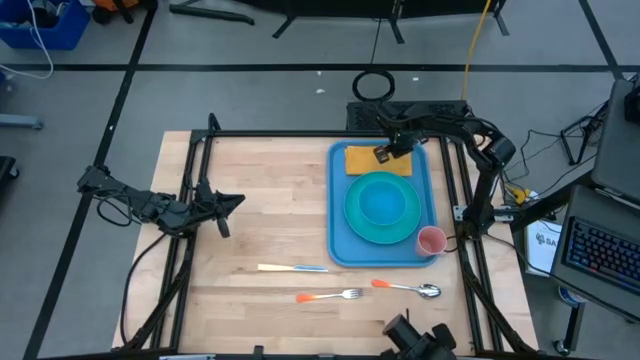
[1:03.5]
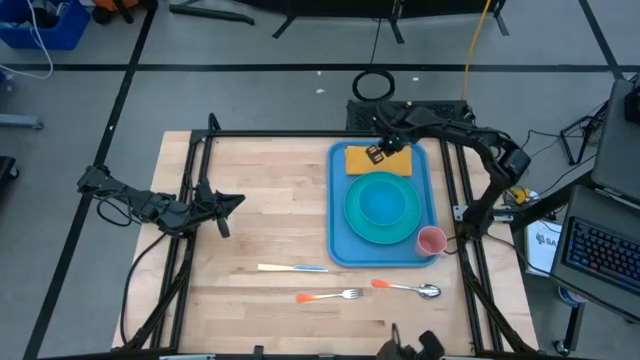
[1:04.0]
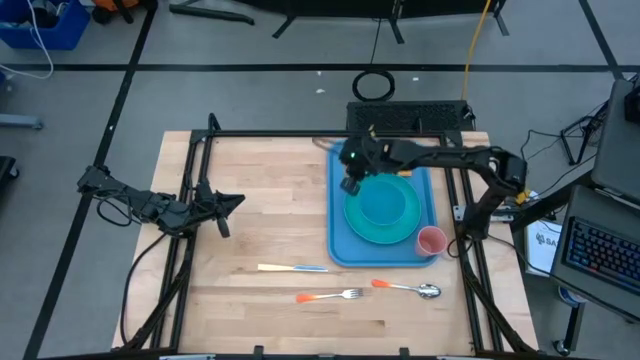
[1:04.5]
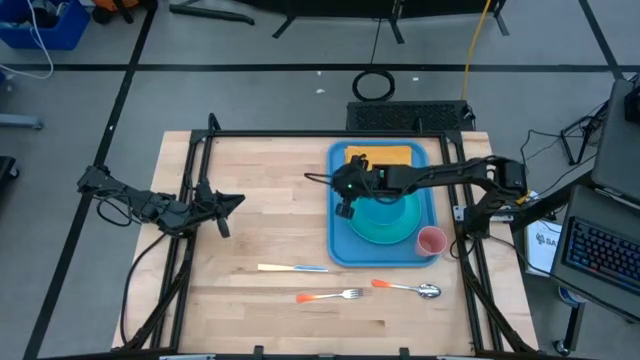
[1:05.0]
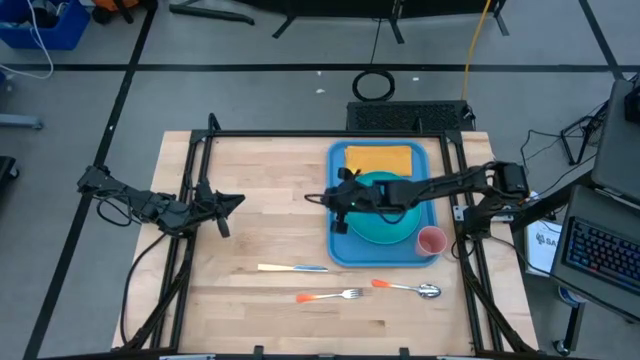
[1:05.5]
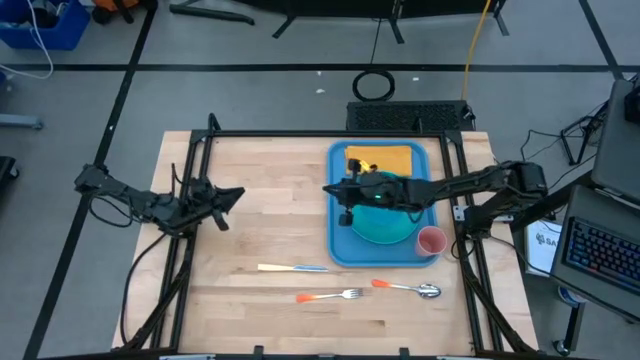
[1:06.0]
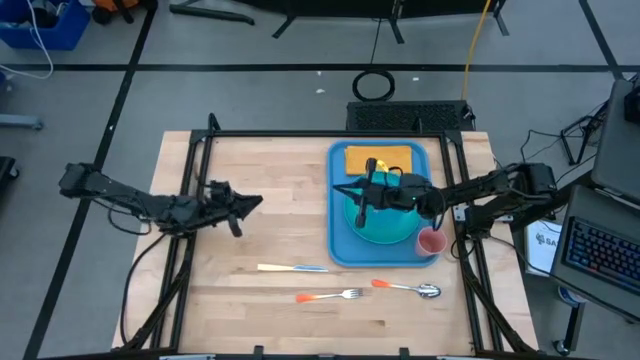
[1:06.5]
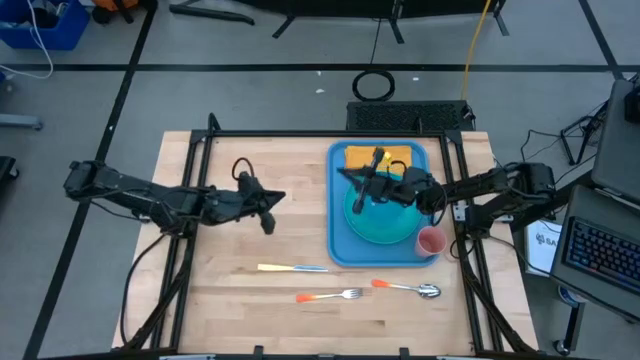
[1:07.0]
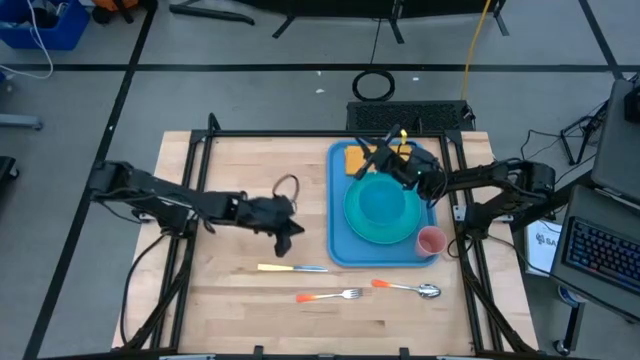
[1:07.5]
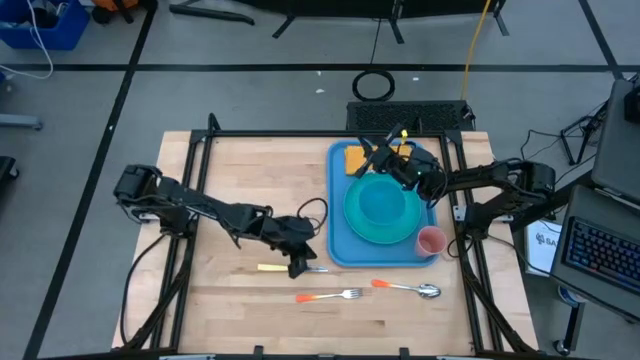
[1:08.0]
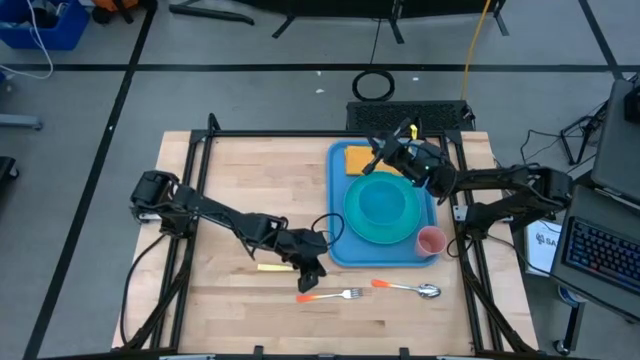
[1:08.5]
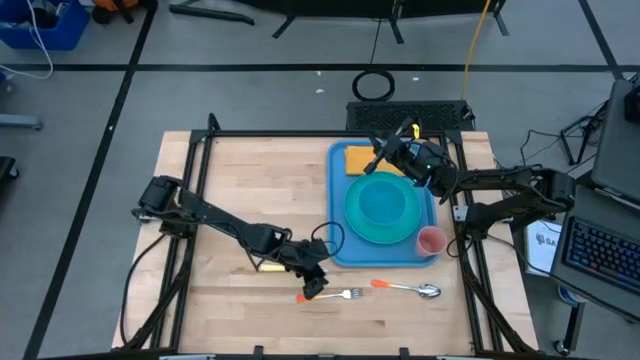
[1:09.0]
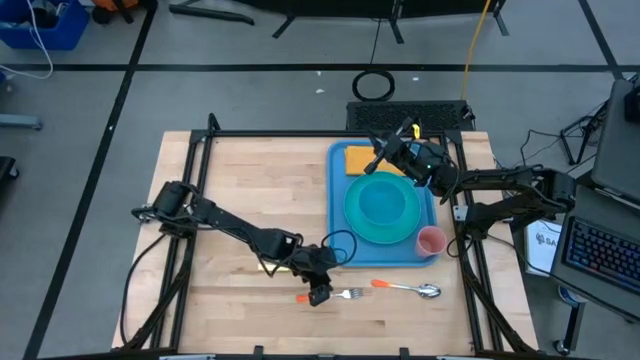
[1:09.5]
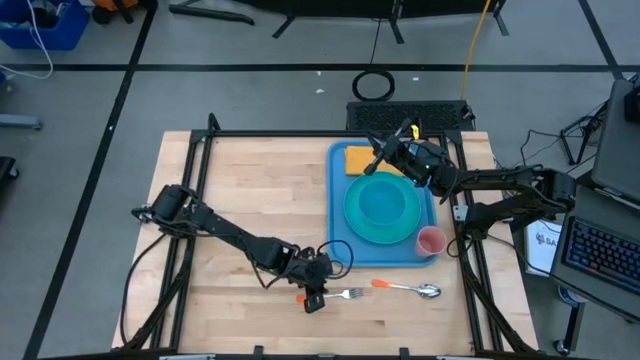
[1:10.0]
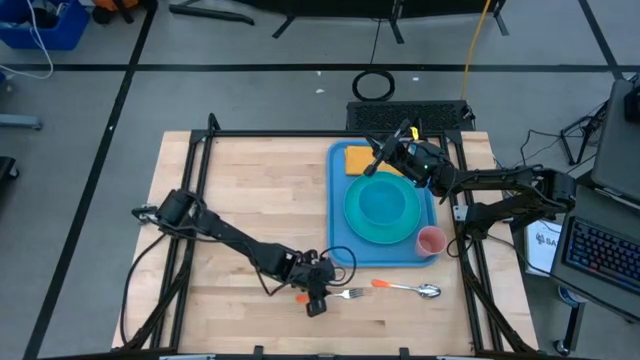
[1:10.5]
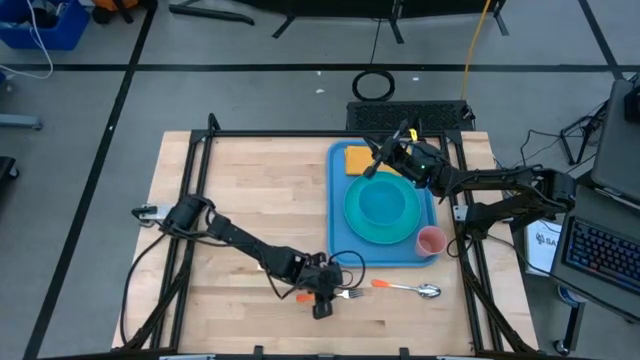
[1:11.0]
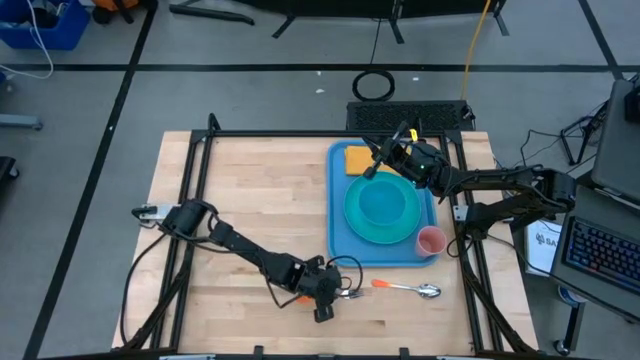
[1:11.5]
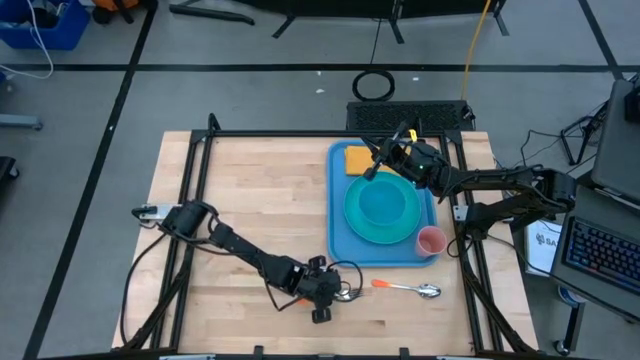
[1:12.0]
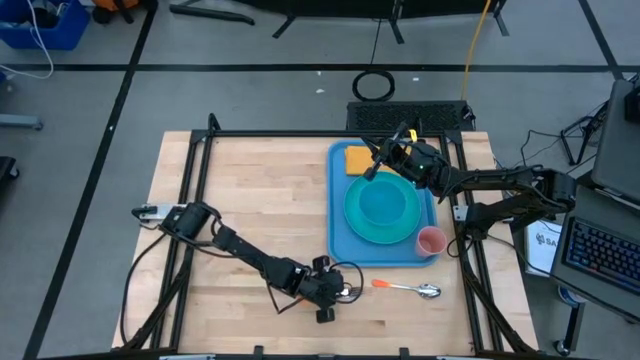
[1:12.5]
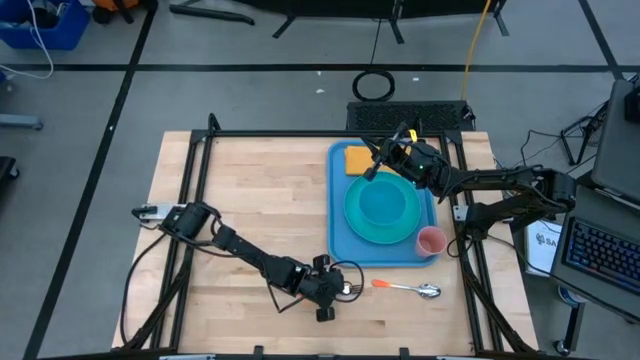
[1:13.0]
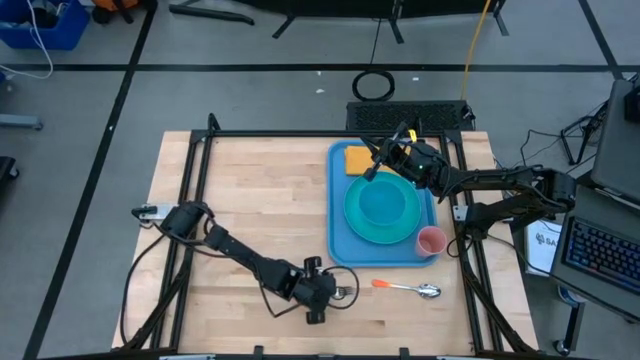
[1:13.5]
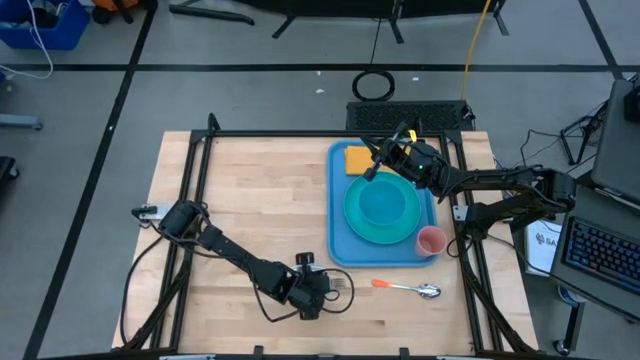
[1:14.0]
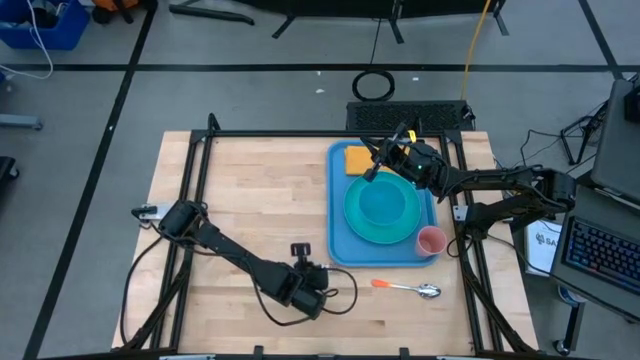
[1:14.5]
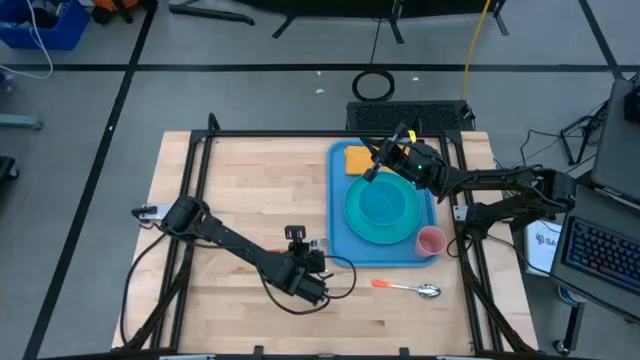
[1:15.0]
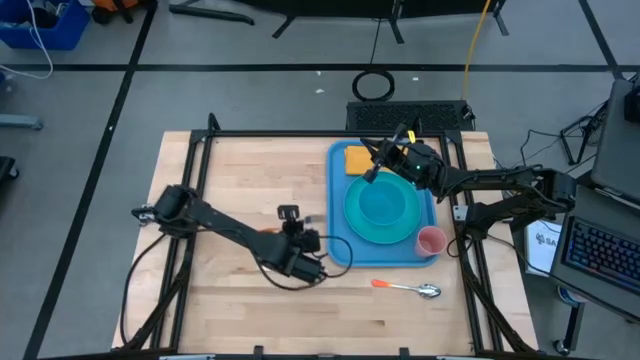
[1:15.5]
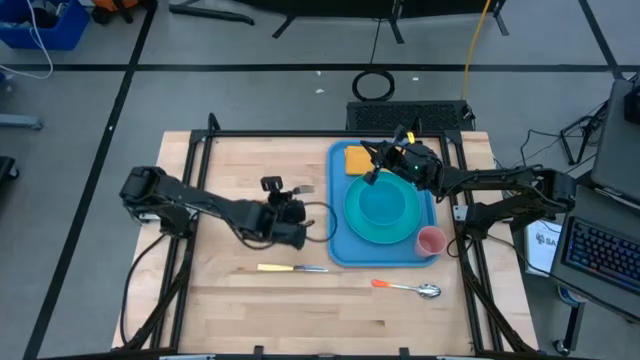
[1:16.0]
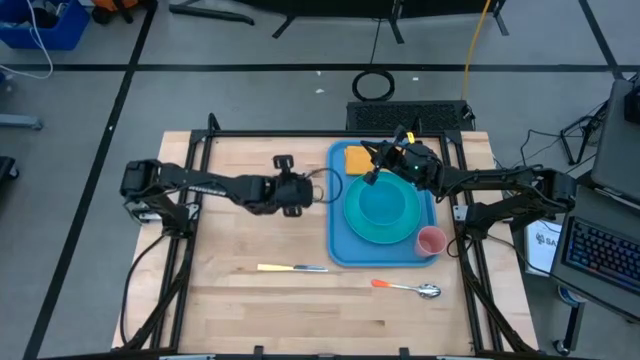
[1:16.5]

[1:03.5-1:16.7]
Task: Set up tray
Put the orange fork on the yellow table napkin on the blue serving tray

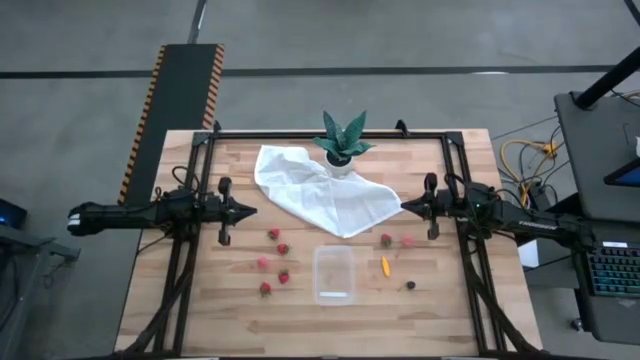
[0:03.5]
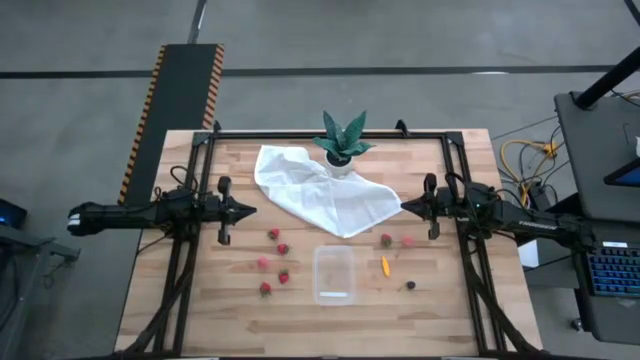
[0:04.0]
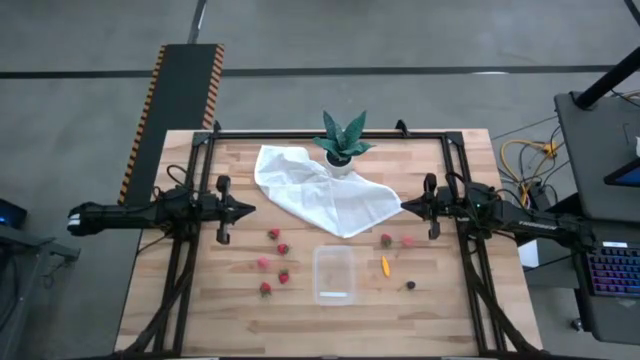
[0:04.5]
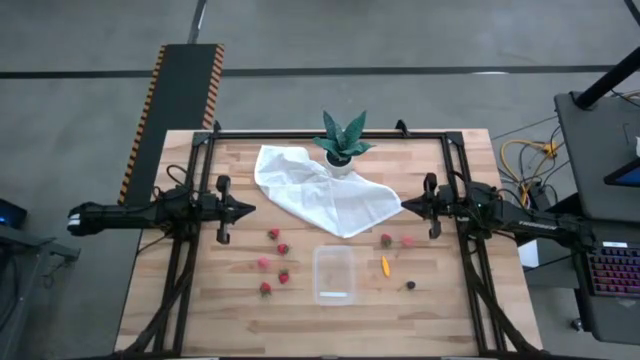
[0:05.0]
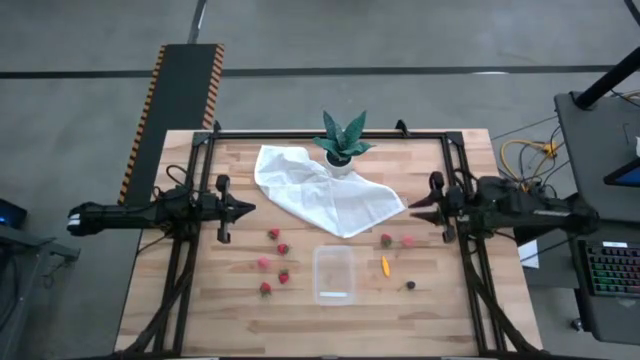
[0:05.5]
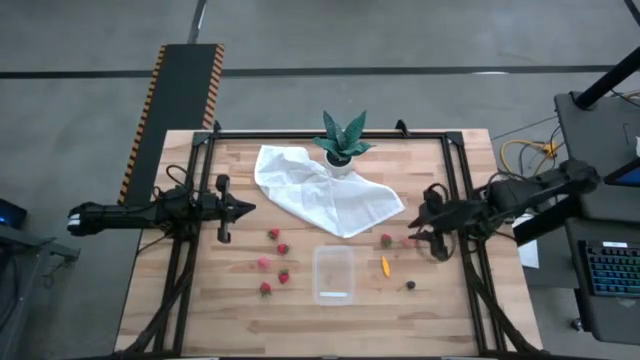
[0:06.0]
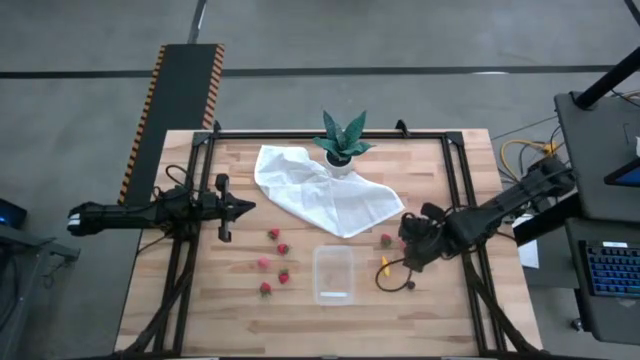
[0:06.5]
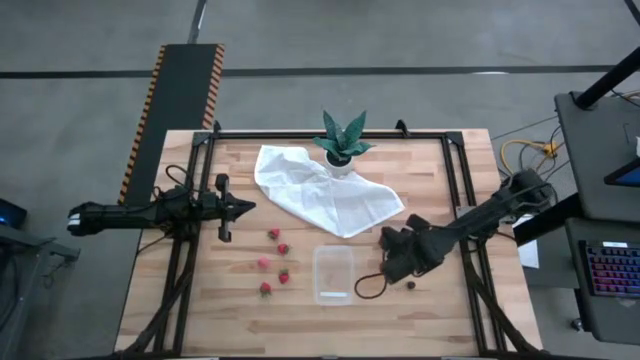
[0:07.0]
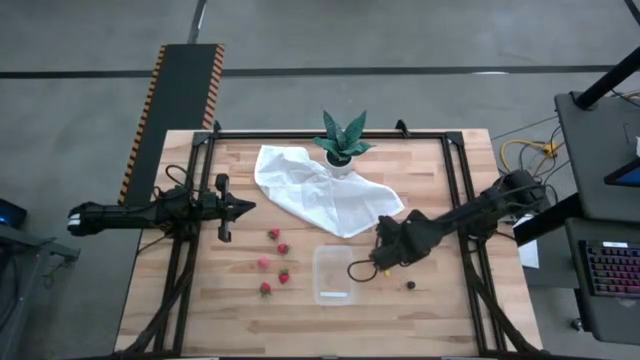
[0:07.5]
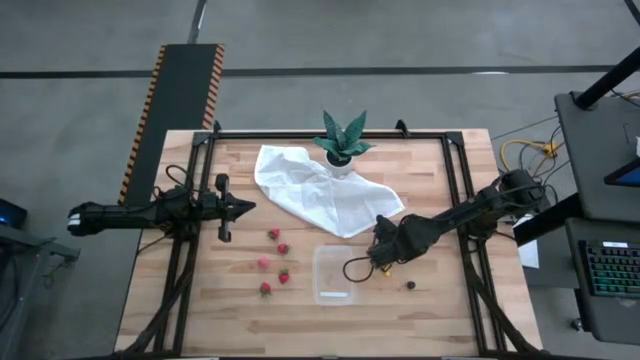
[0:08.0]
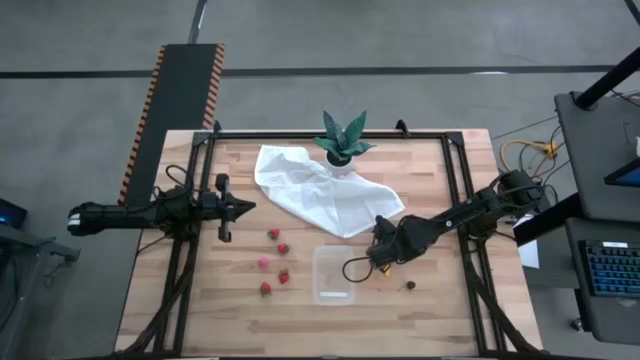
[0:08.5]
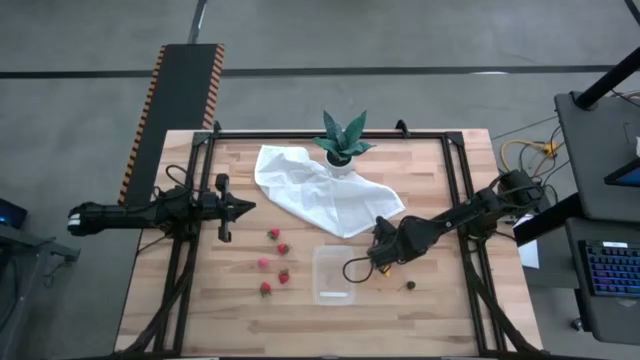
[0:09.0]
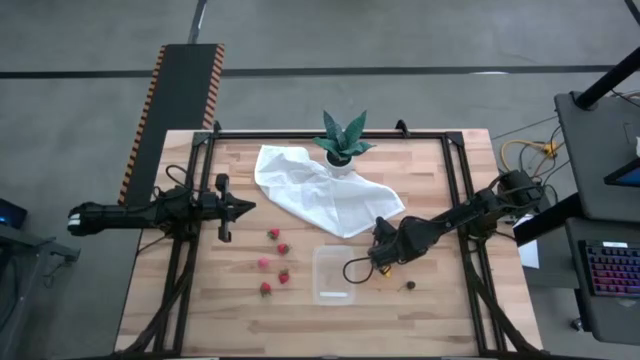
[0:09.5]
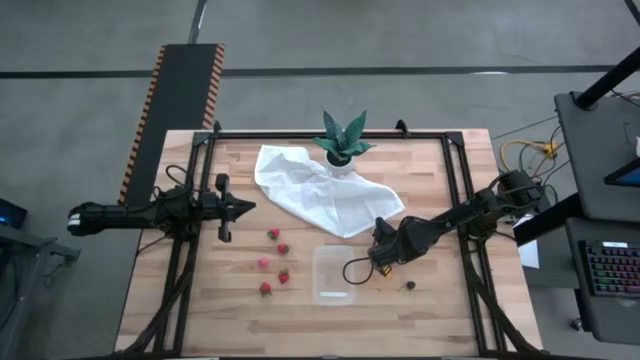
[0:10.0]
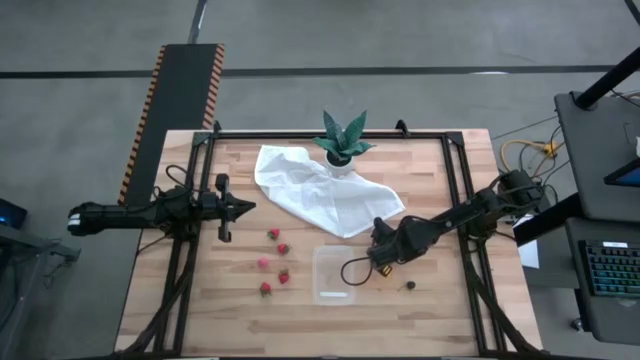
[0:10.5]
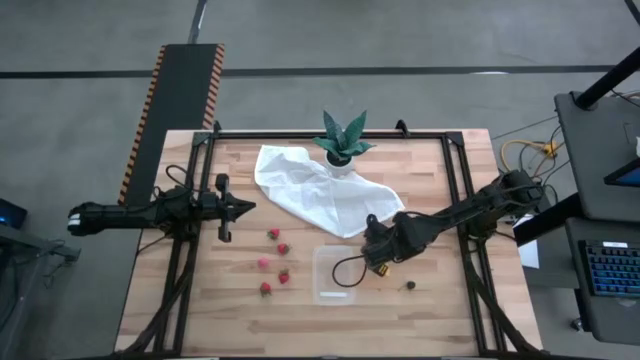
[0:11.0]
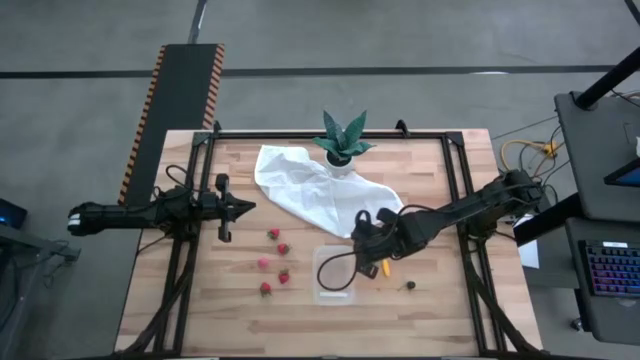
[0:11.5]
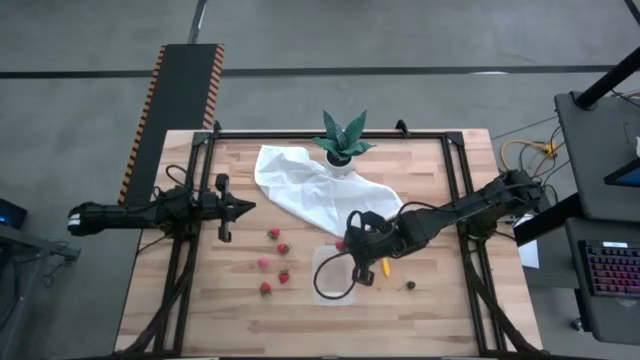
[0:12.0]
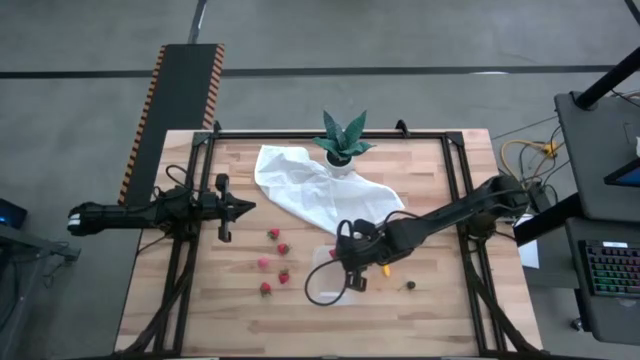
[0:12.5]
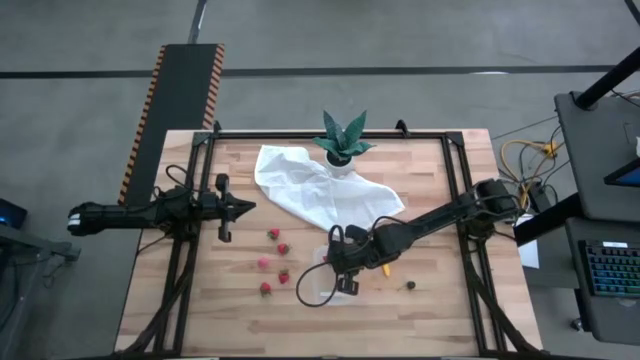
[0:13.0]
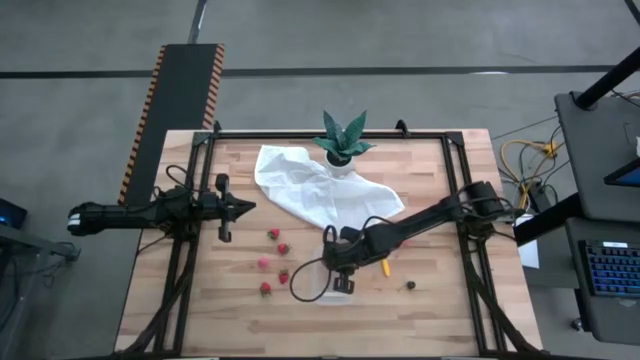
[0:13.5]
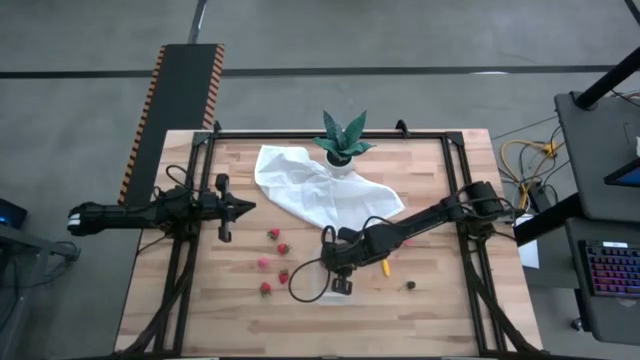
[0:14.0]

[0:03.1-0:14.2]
Task: Pick and placing Produce into tupperware
Put the red strawberry into the transparent bin
